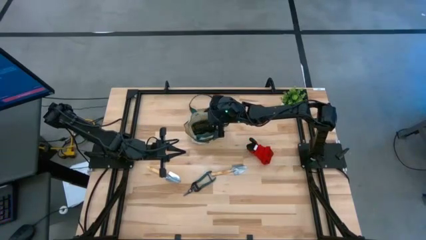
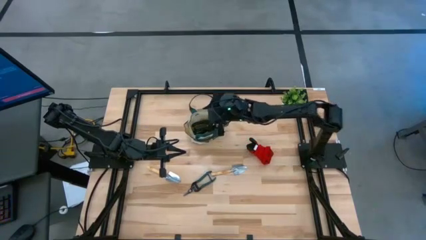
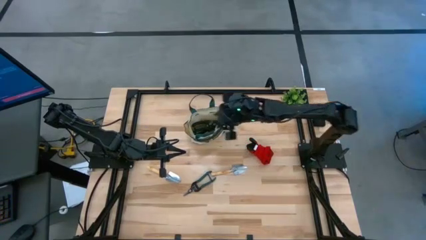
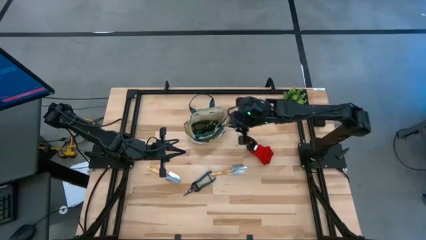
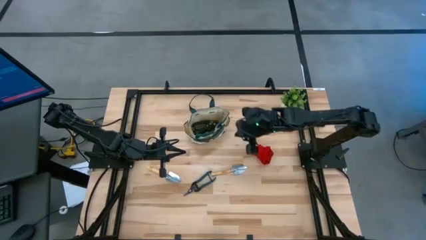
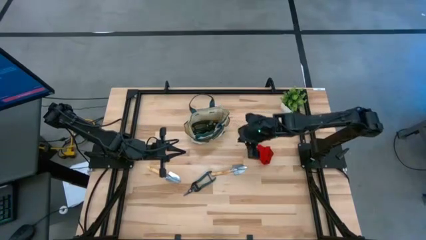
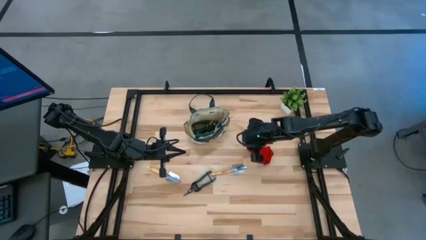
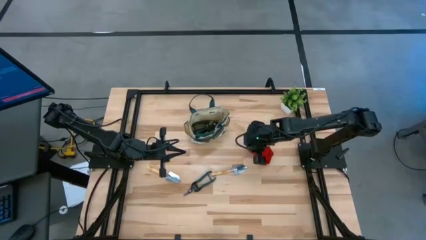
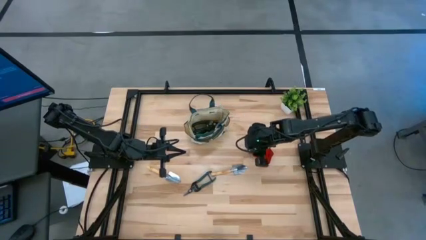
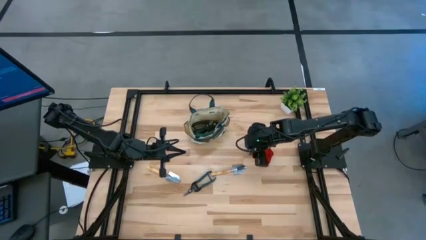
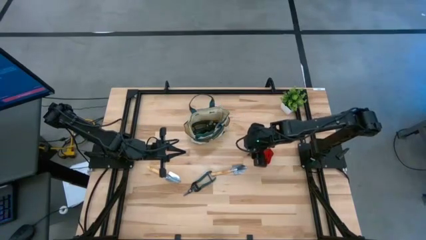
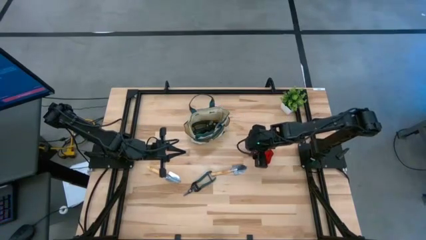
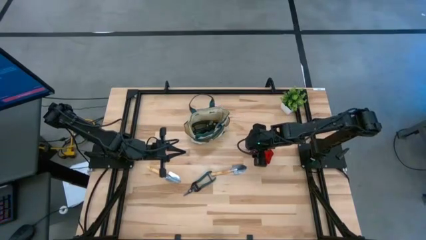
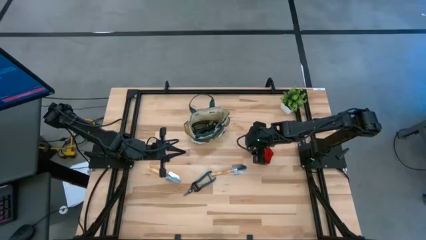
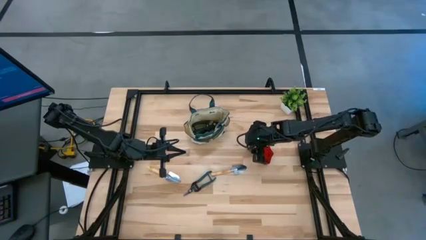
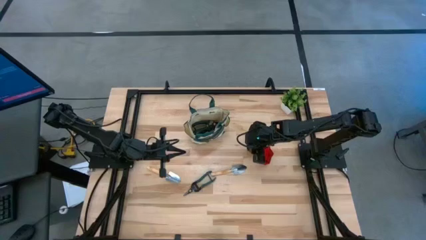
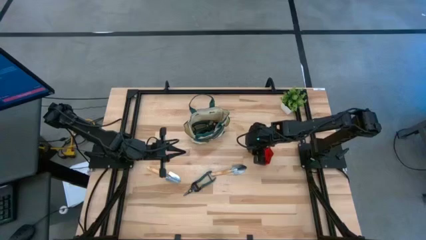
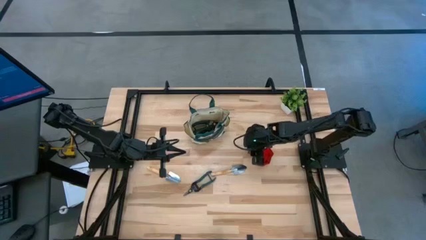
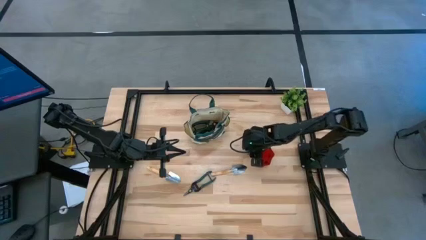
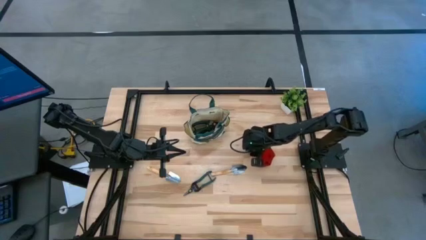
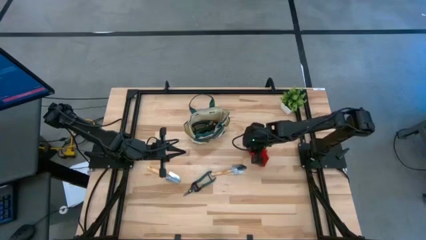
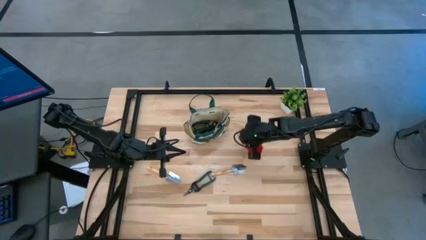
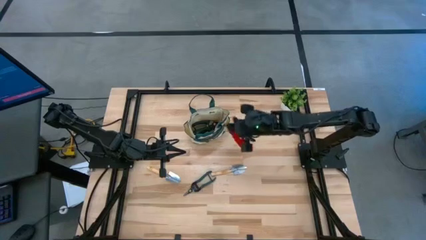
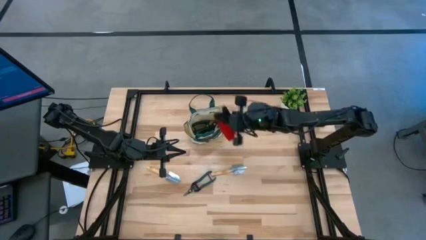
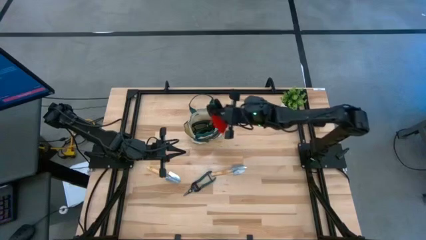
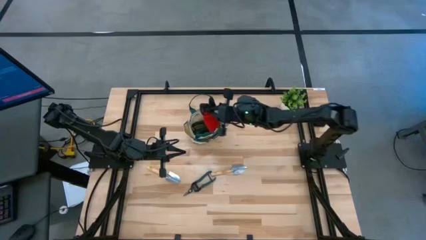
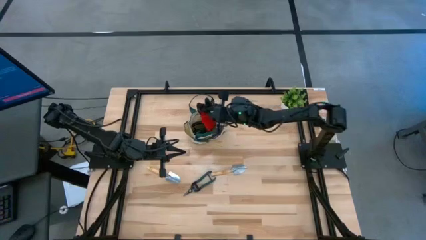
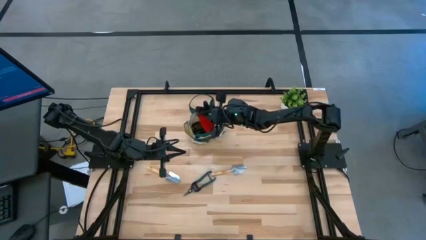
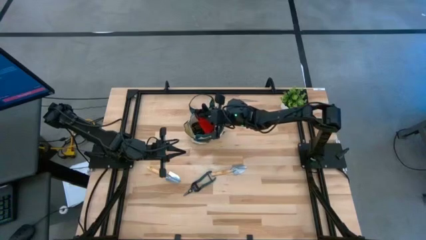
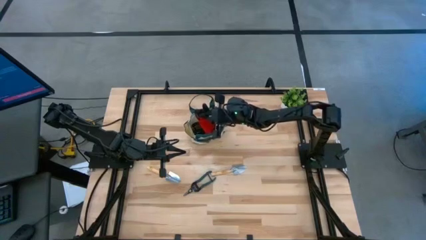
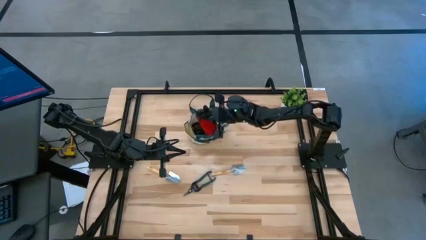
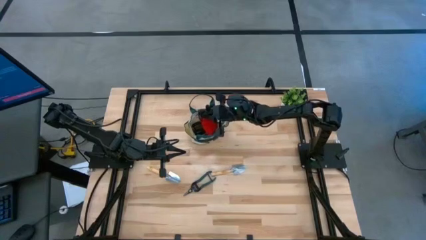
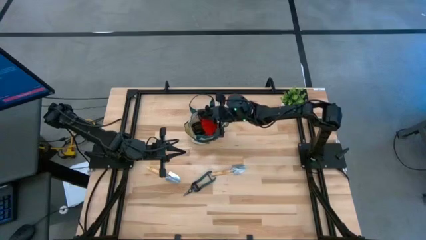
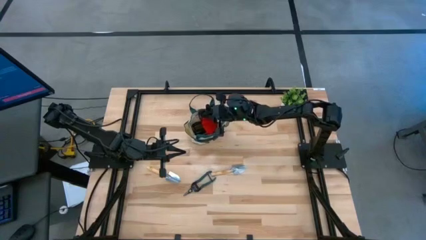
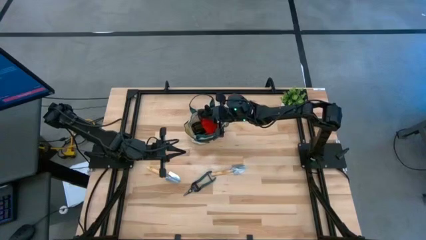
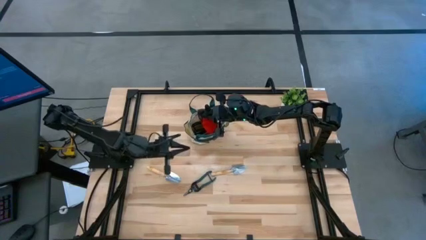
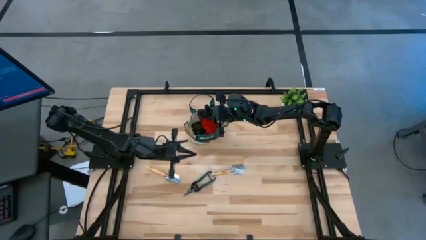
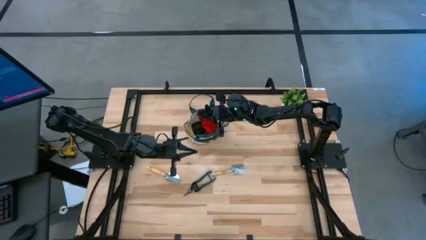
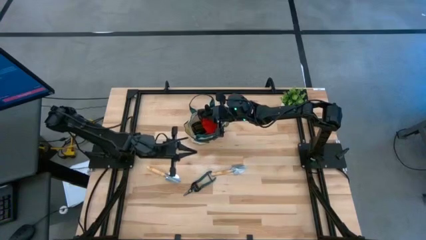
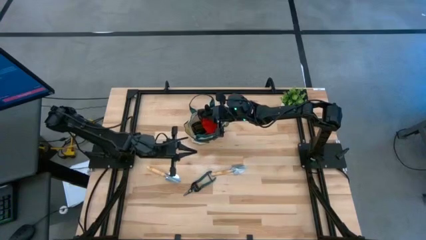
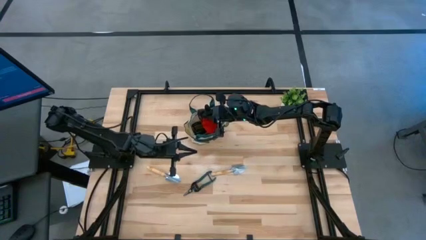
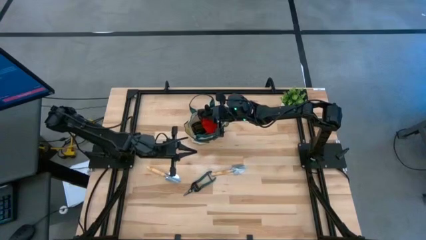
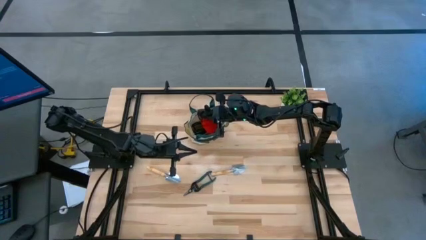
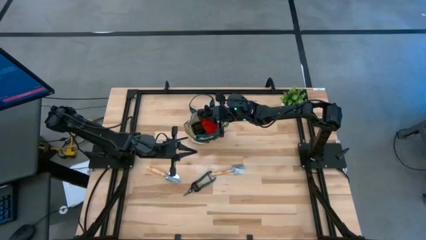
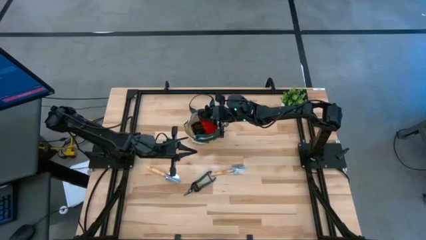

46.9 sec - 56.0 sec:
Task: Pick & Place Garden tools in Gardening bag
Put the red gloves into the brown gardening bag

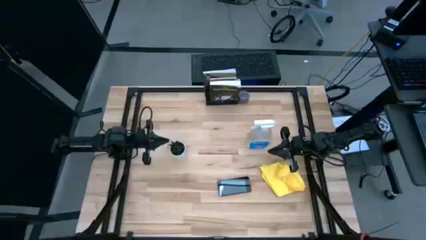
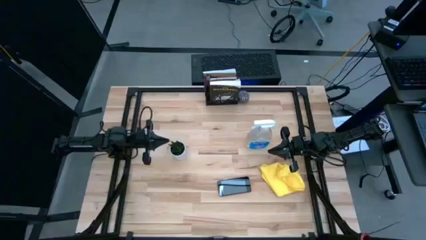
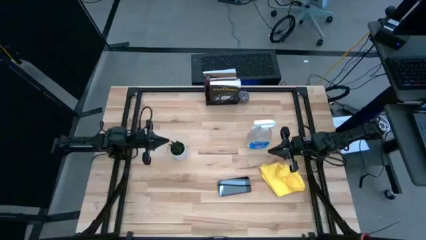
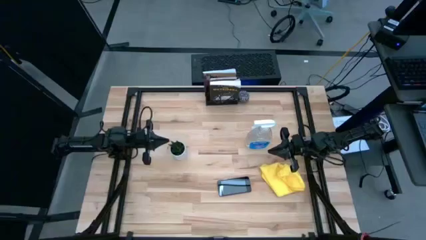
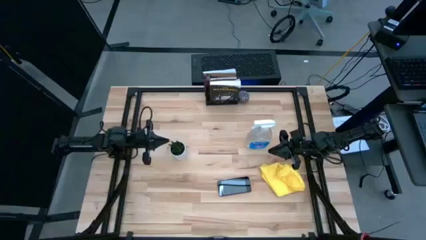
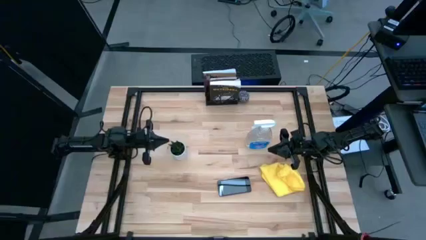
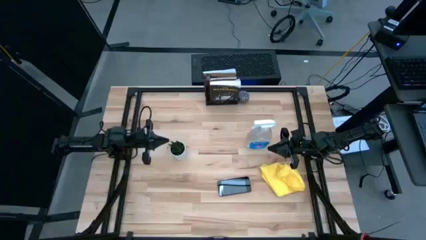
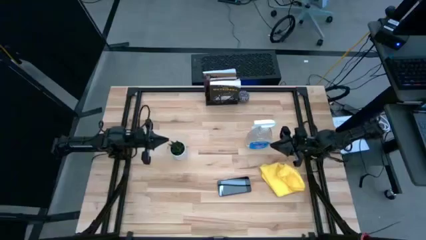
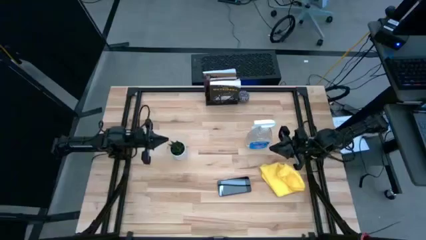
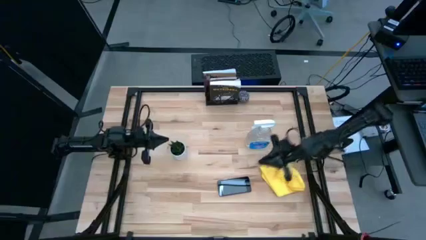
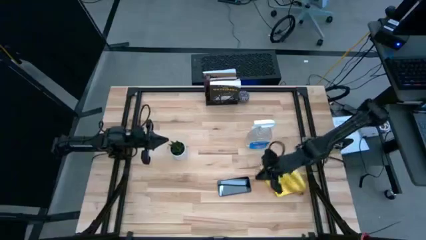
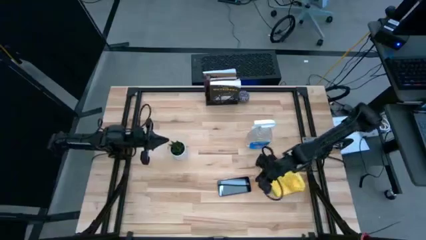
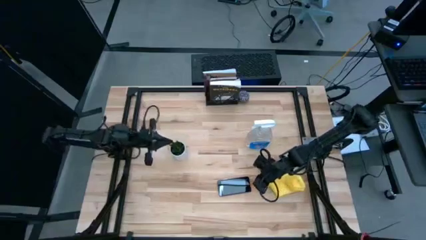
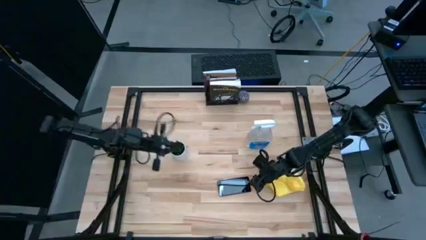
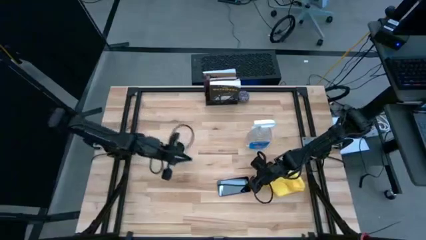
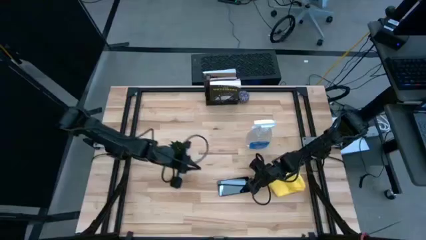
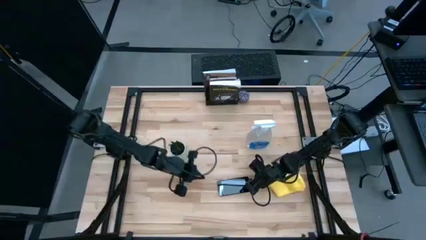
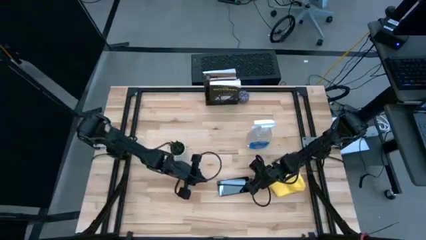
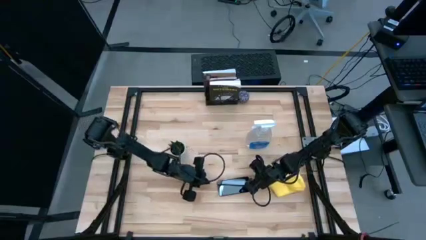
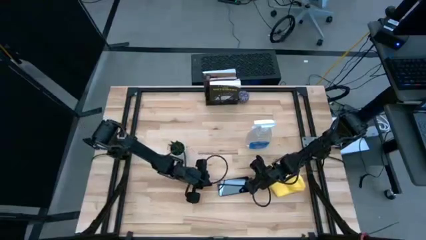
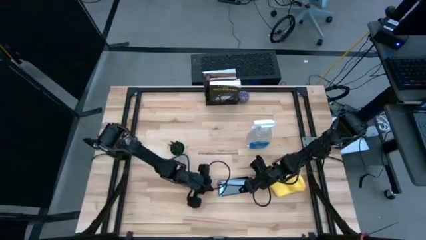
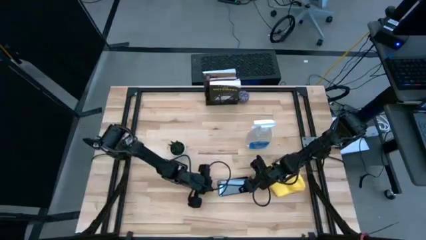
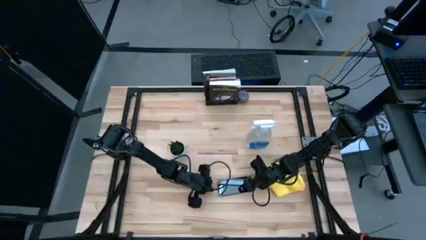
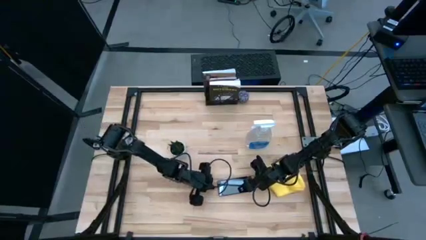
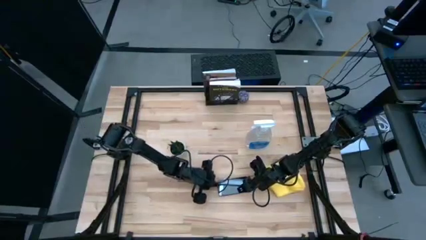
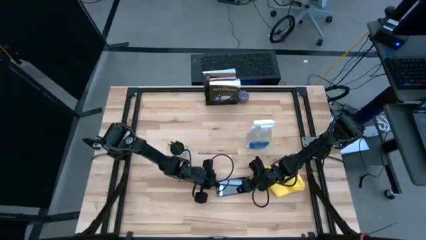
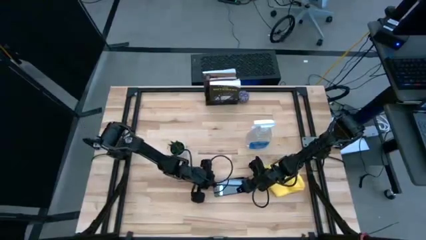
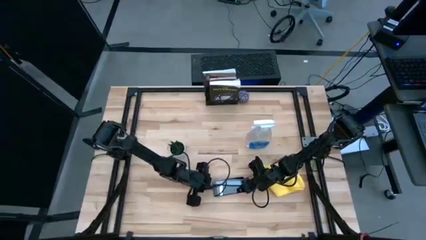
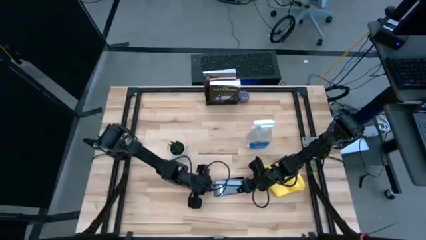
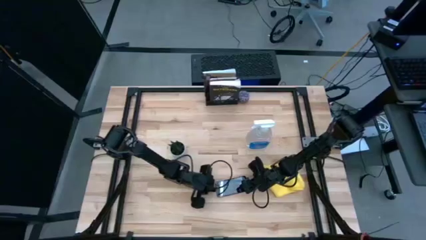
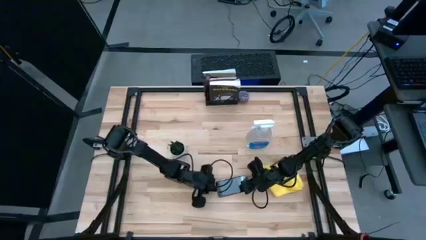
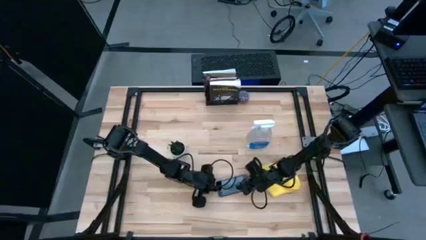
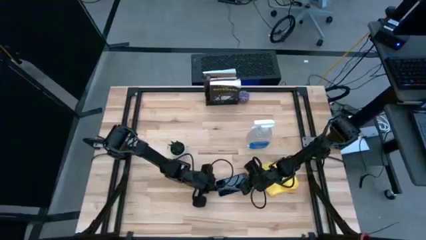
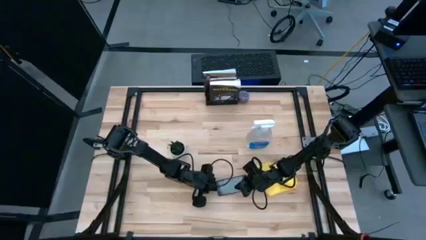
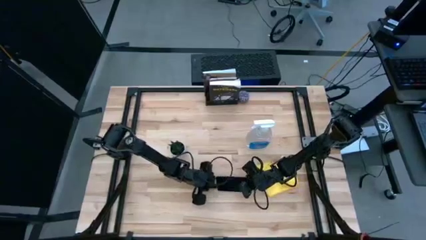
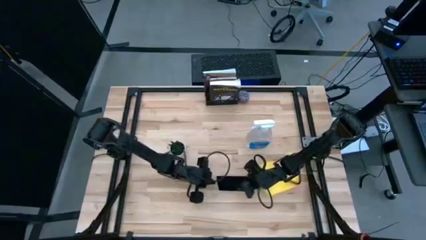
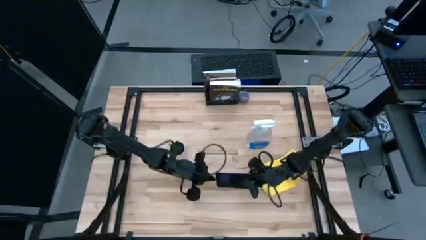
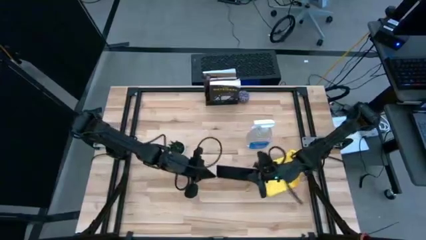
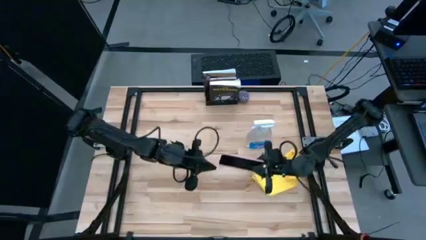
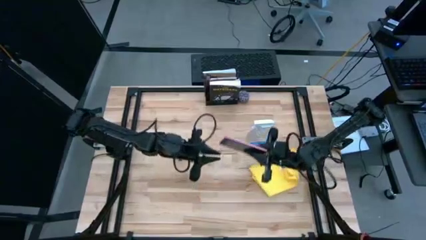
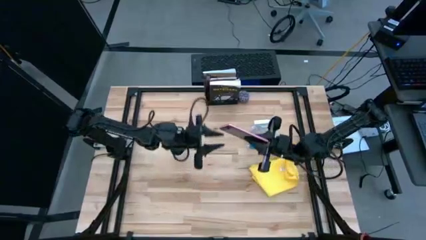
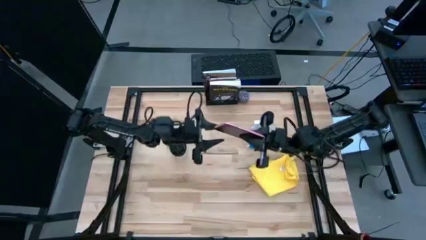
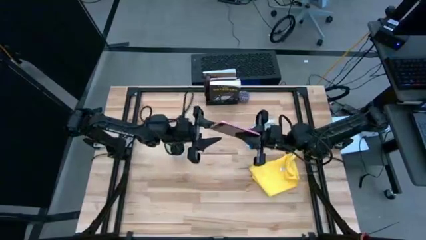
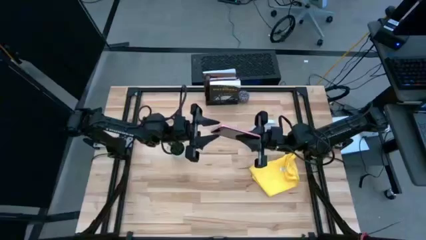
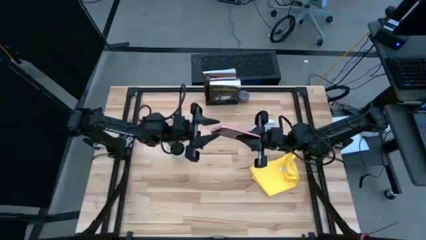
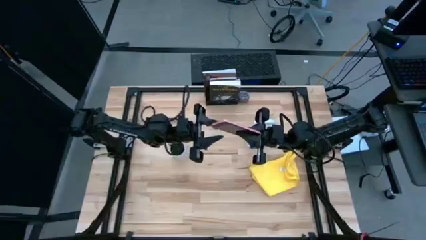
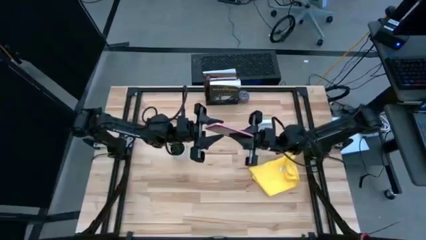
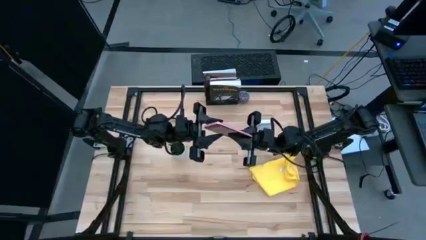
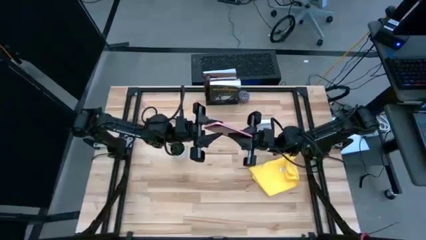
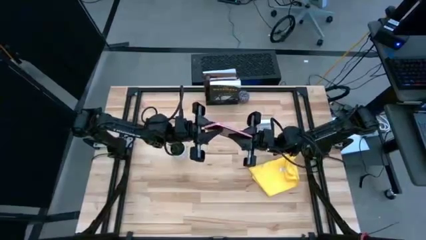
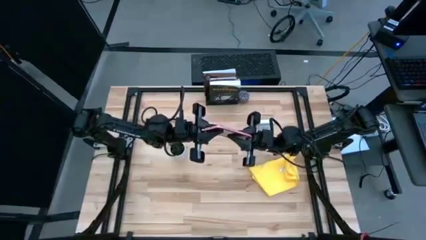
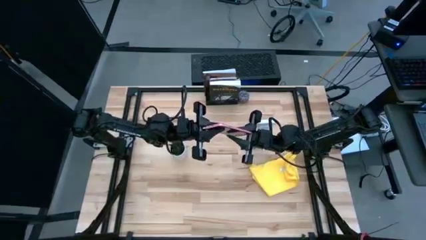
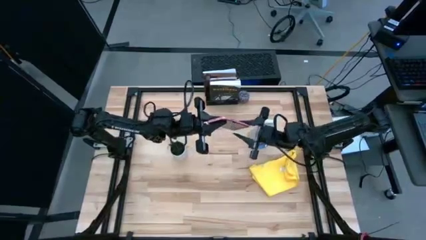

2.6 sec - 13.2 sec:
Task: Apply microfiber cloth
Spray the front of the cellphone using the spray bottle
